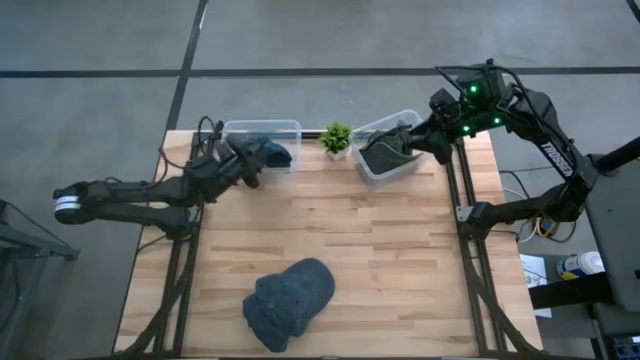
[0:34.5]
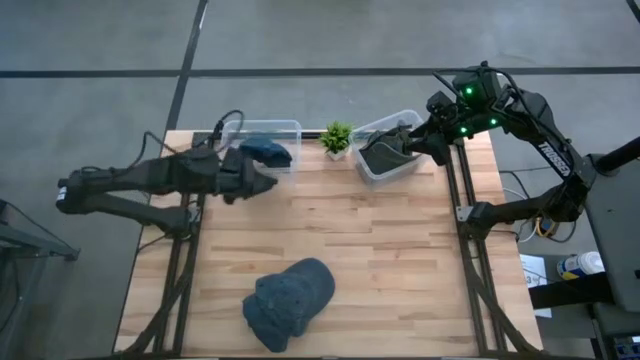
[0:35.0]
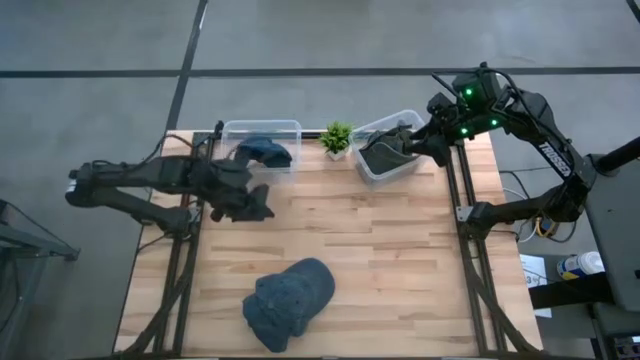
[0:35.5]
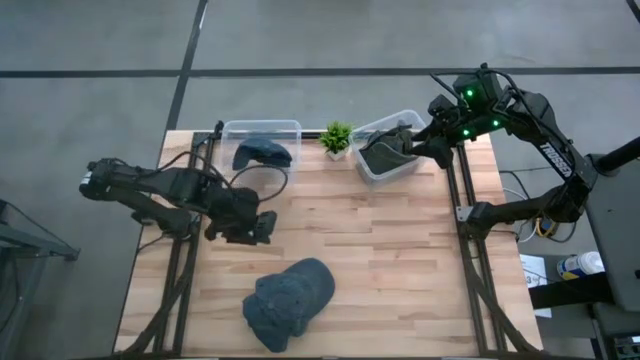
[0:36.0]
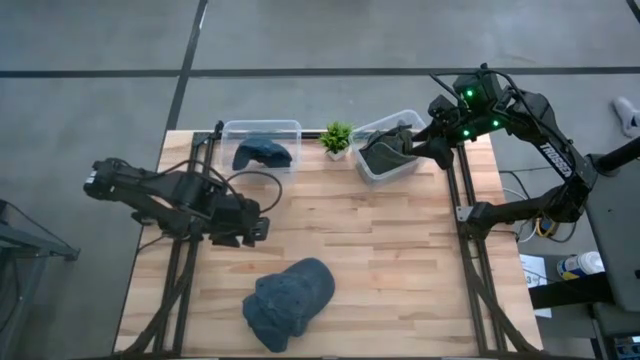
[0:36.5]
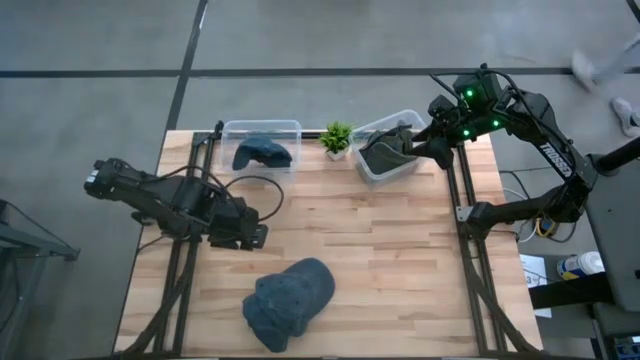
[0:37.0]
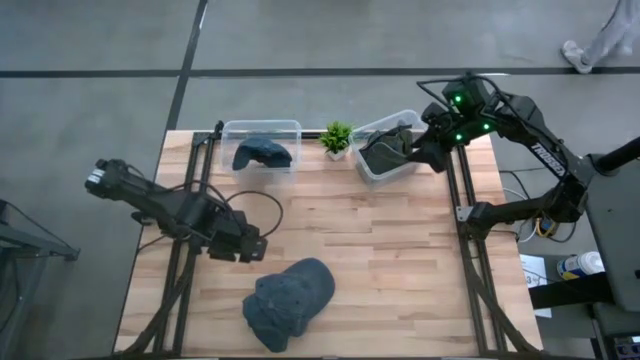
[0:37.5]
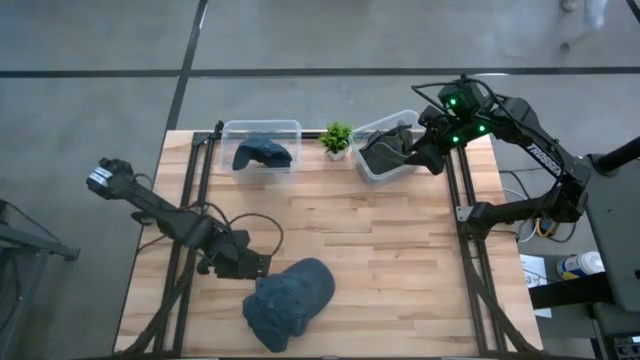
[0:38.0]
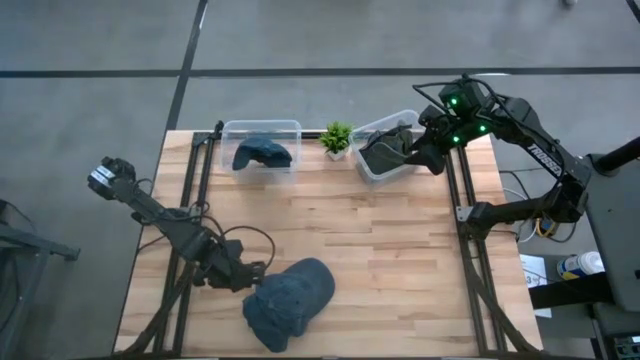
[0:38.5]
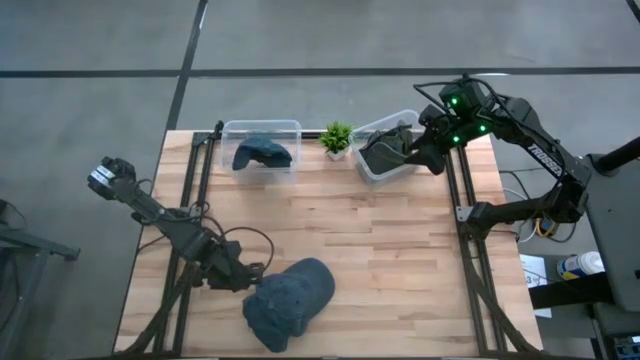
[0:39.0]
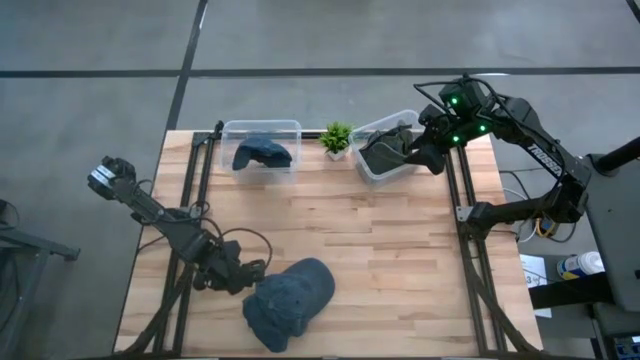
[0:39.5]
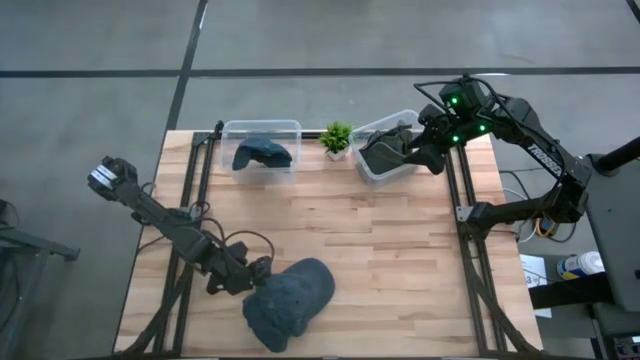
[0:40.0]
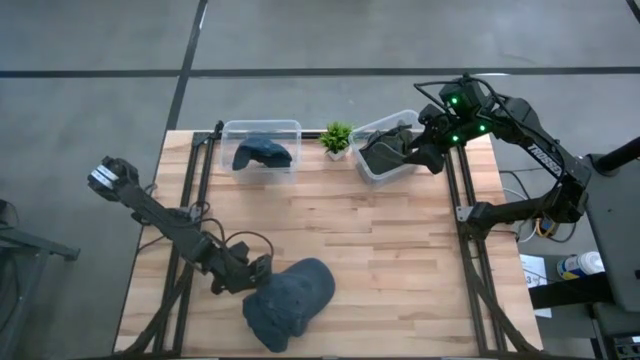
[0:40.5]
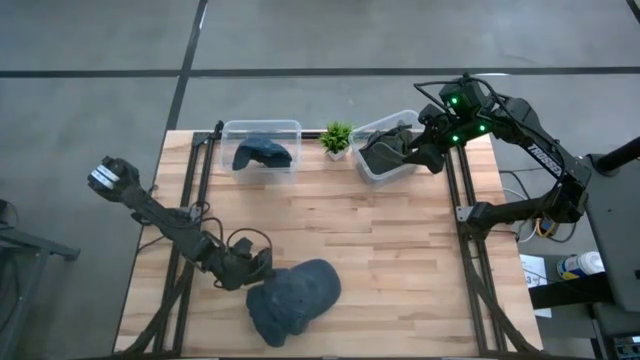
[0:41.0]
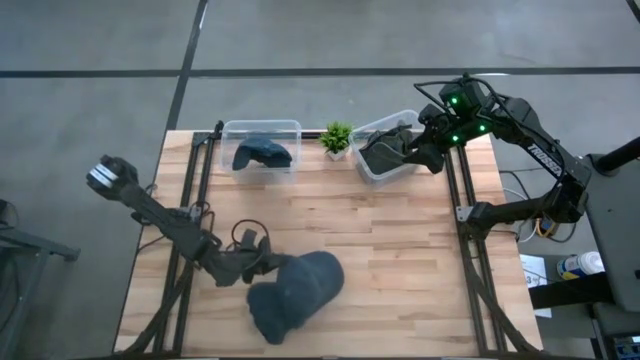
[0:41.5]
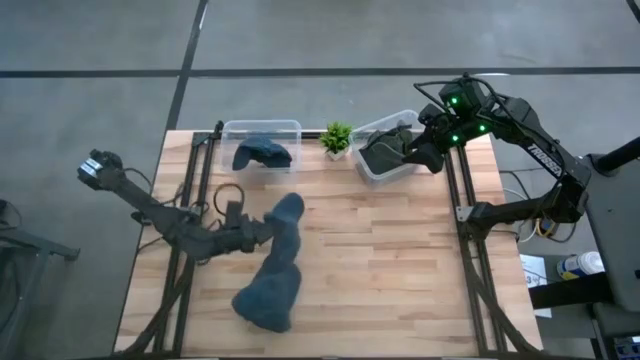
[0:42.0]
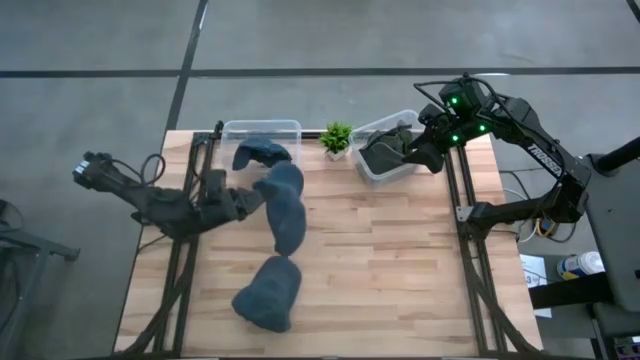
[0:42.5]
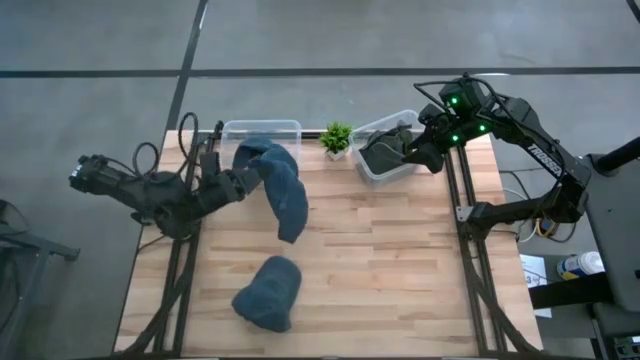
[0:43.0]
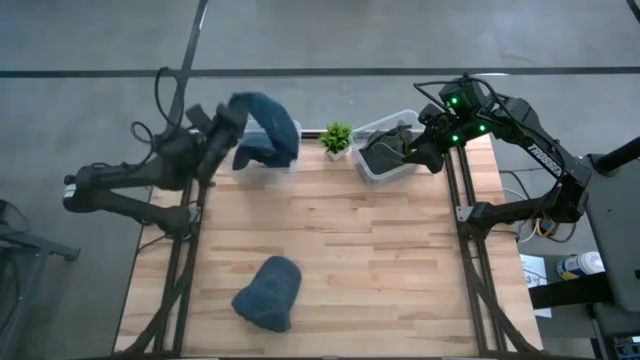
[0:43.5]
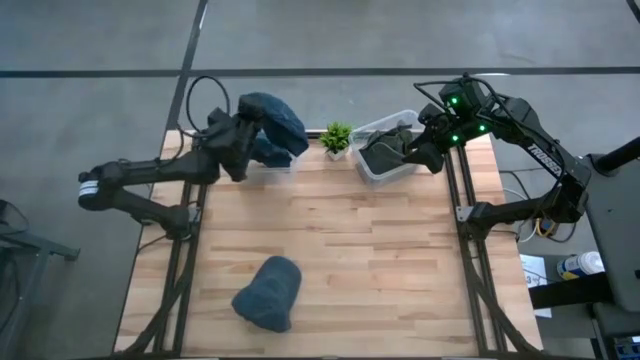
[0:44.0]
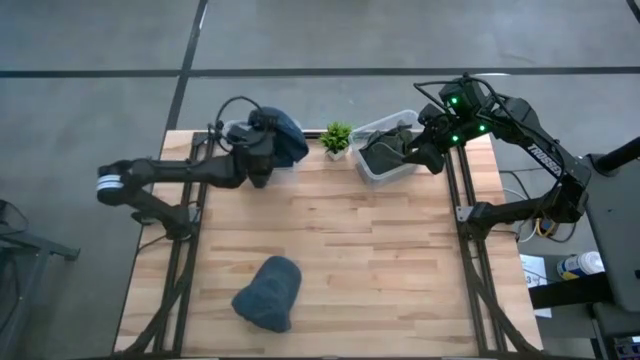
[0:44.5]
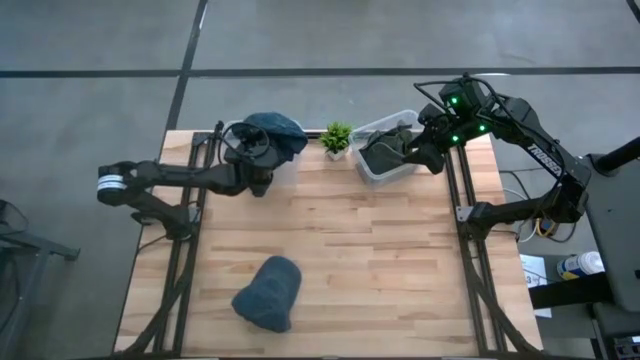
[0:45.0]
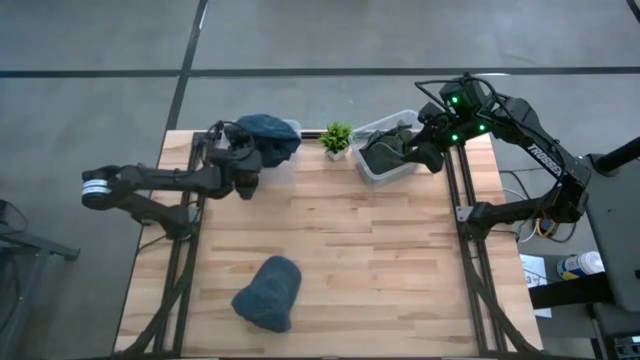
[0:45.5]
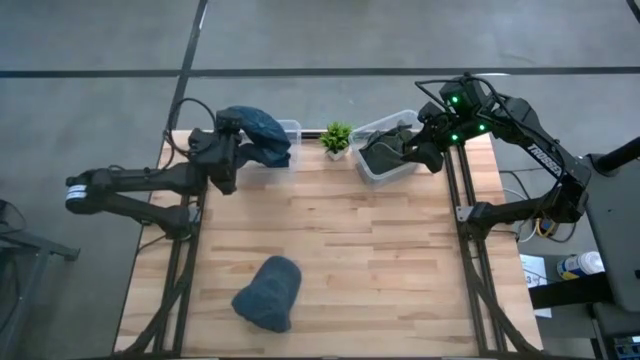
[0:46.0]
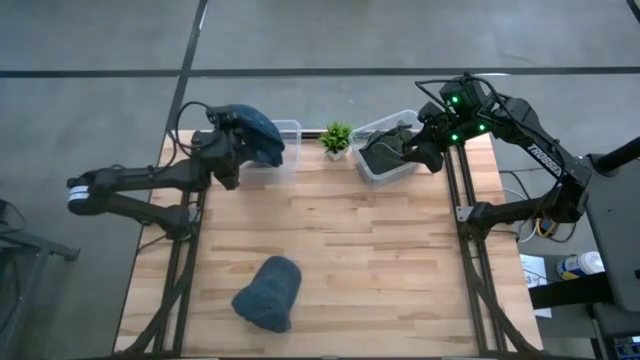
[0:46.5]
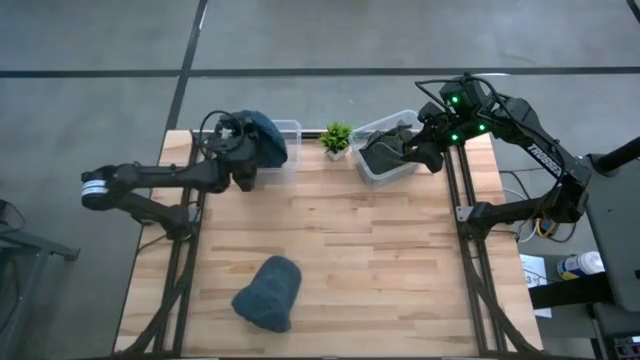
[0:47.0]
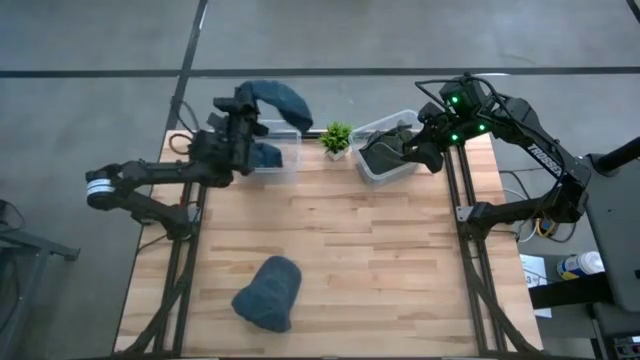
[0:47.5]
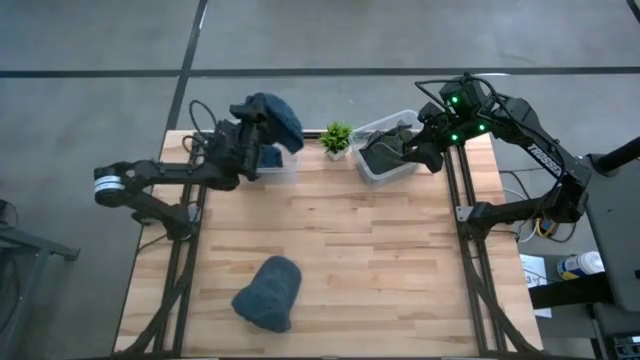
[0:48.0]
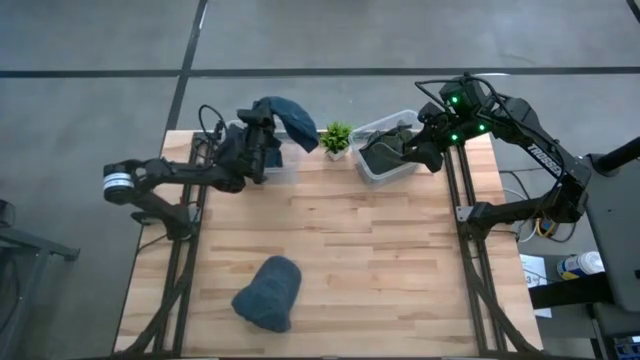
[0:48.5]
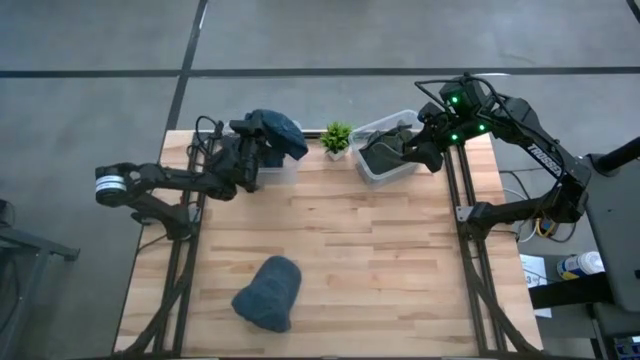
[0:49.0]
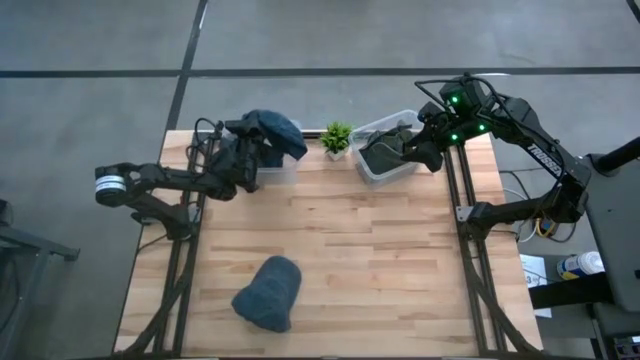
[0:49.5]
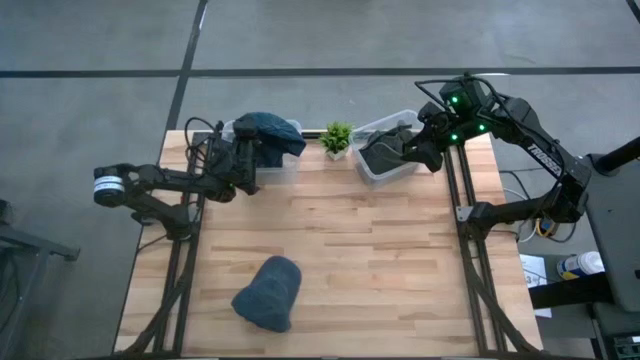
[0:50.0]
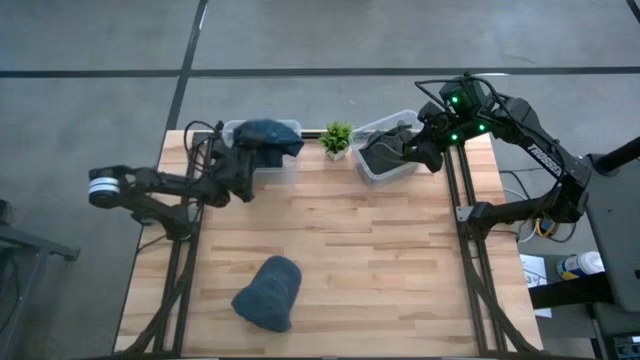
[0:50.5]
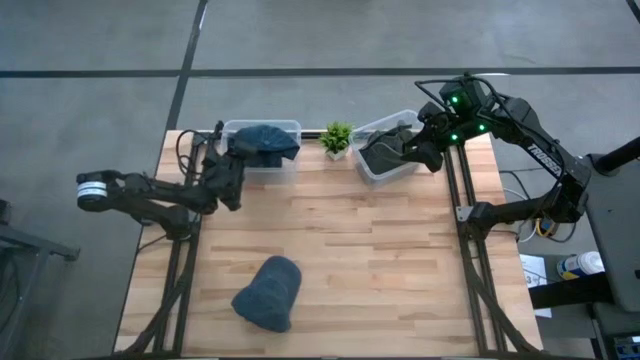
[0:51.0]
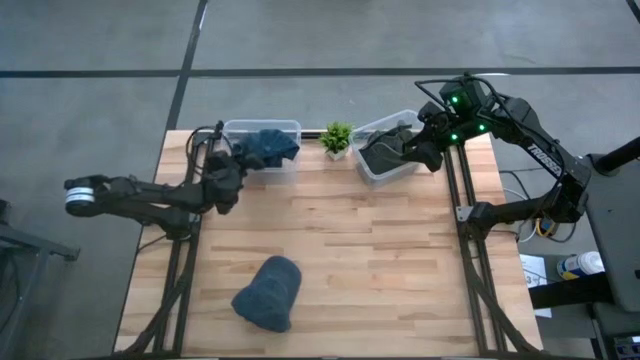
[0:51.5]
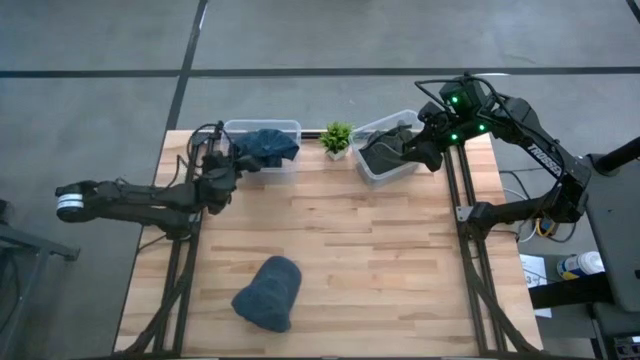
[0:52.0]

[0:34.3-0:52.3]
Task: Pick & Place hat
Put the top blue cap into the left transparent bin

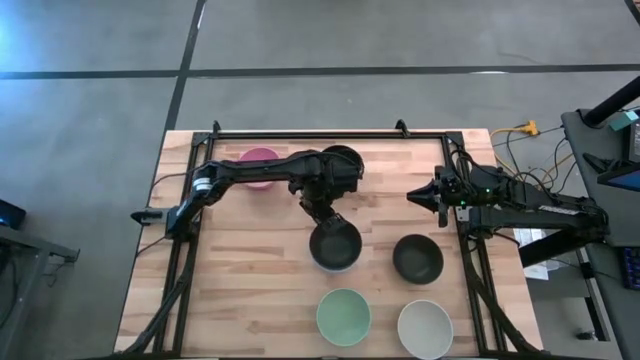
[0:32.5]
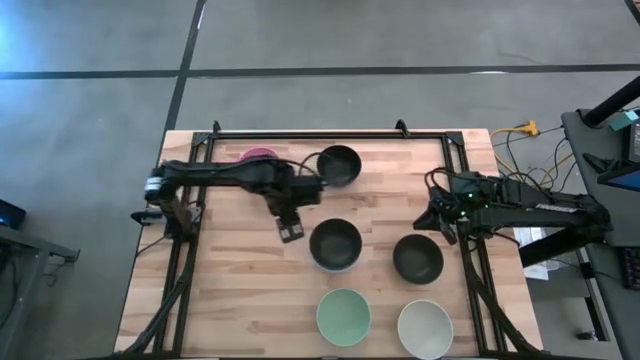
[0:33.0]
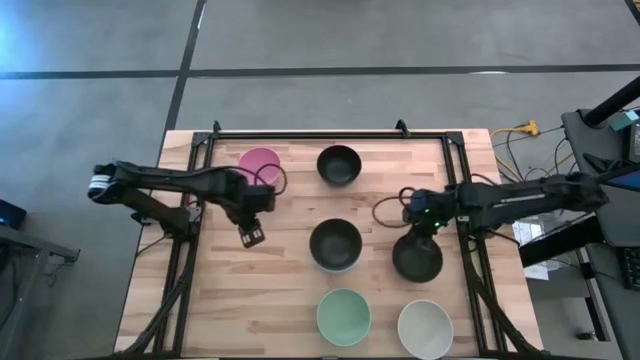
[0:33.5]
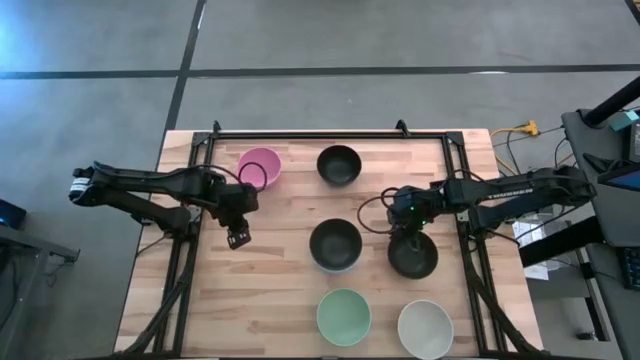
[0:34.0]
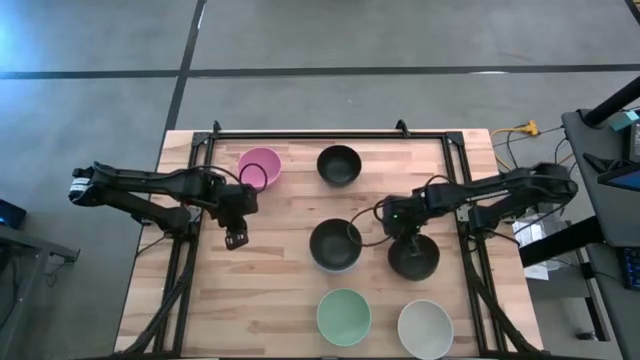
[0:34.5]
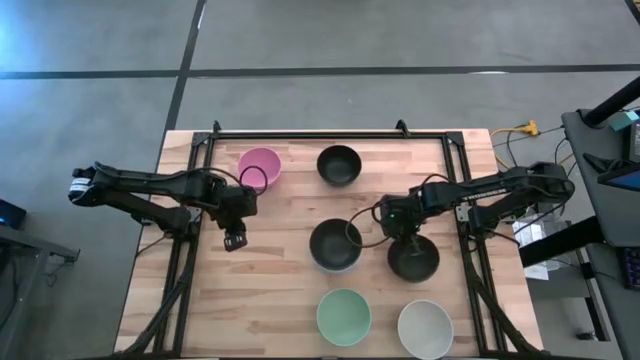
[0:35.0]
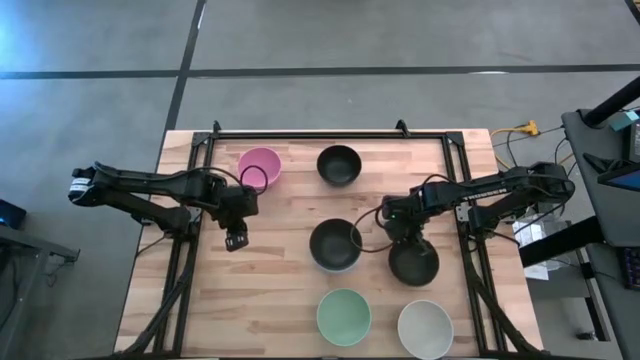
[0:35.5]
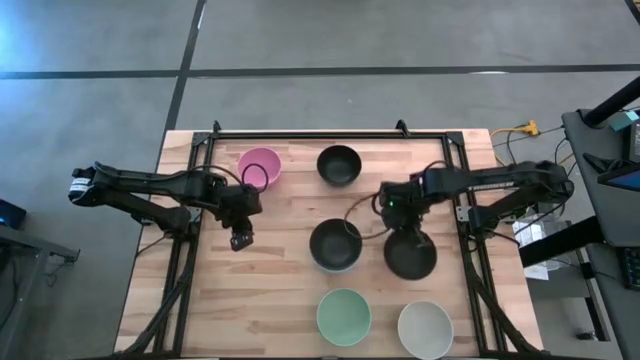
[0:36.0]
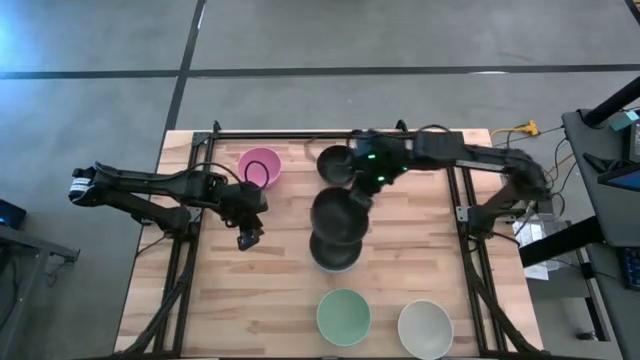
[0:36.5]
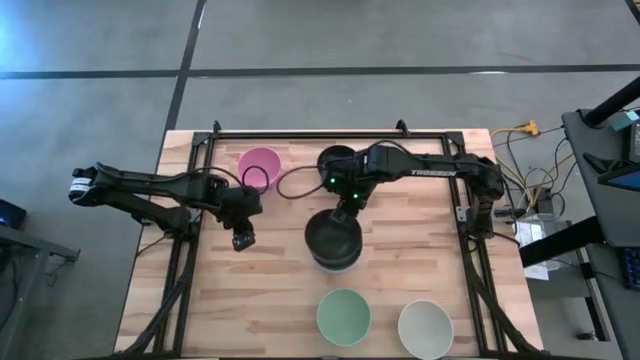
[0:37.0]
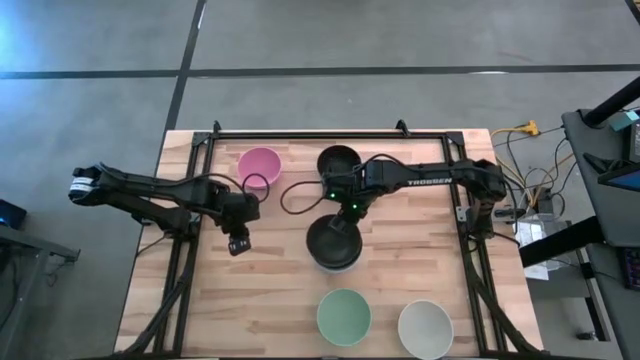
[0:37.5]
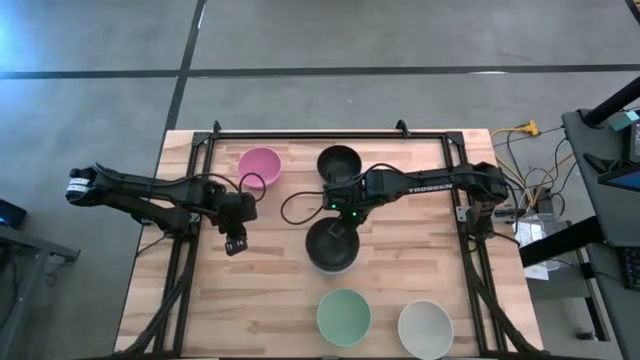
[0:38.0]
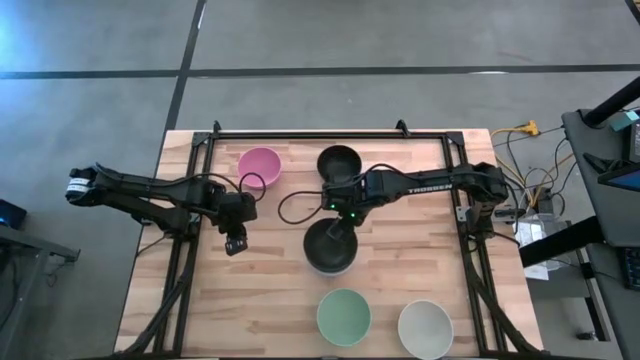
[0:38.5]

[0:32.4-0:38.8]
Task: Nest bowls inside each other
Stack the bottom black bowl on top of the black bowl
